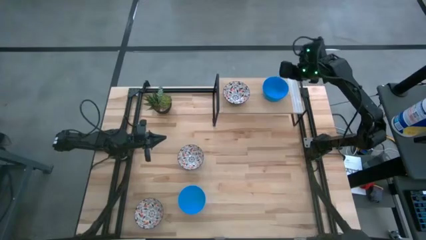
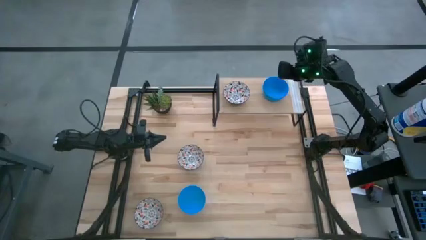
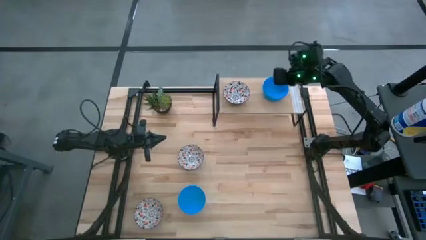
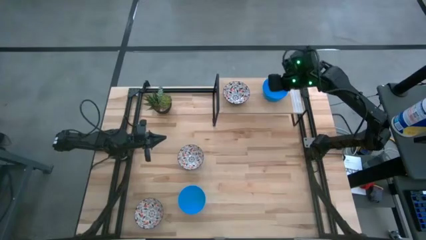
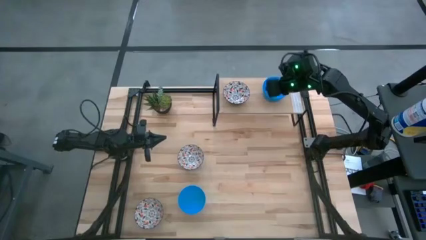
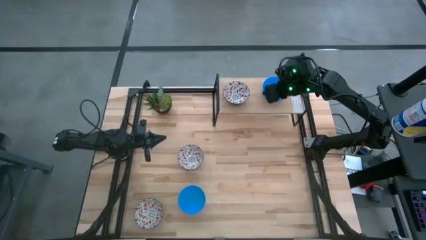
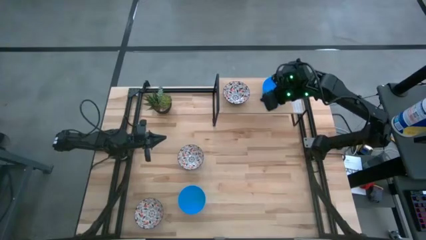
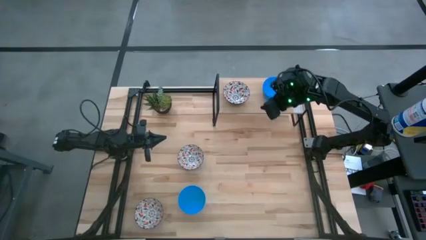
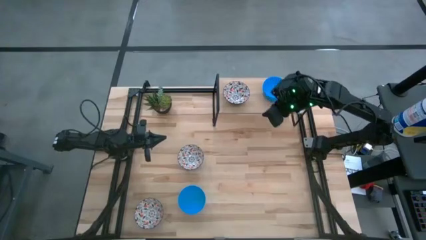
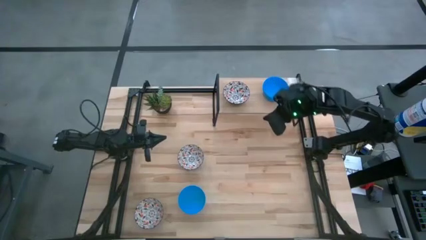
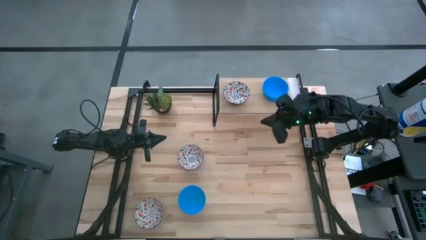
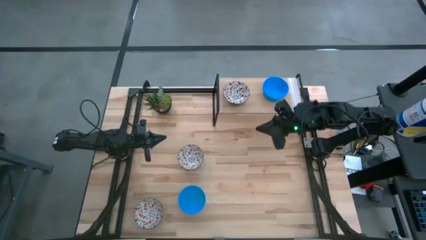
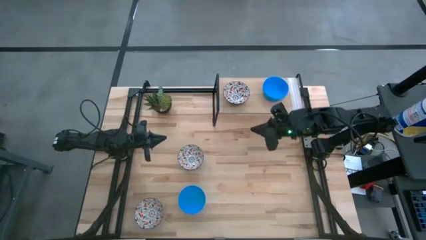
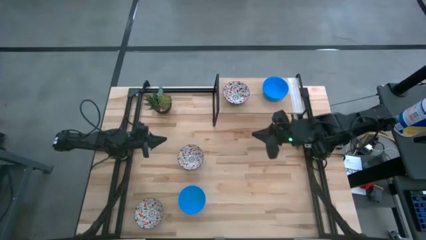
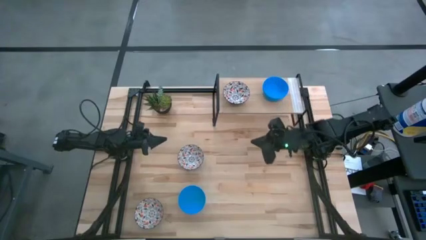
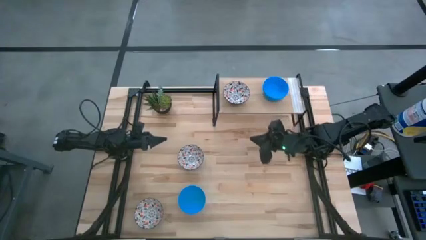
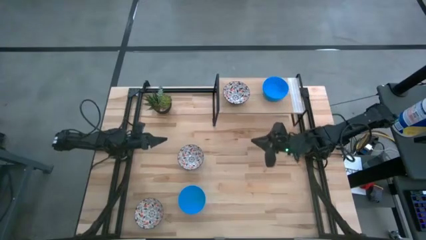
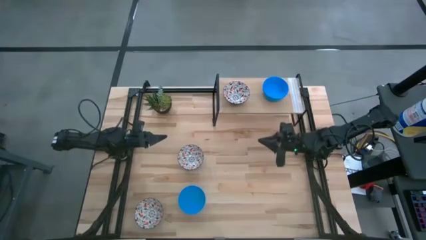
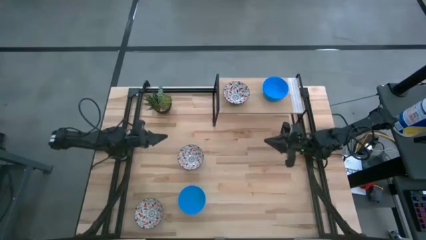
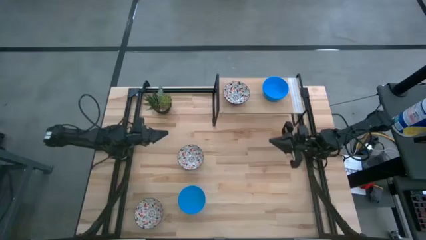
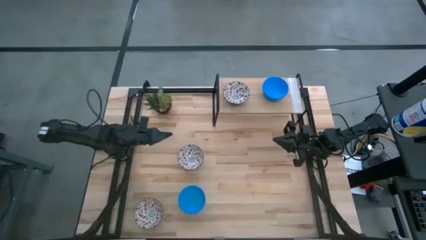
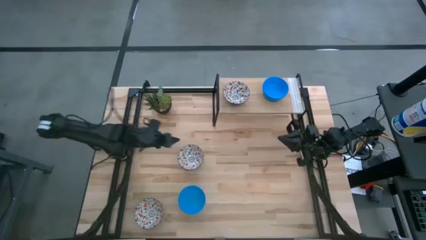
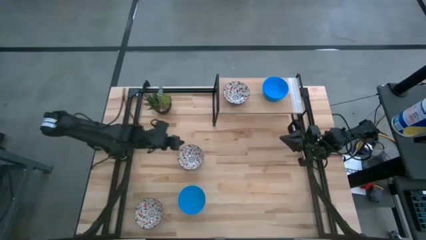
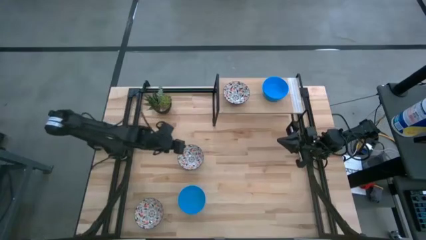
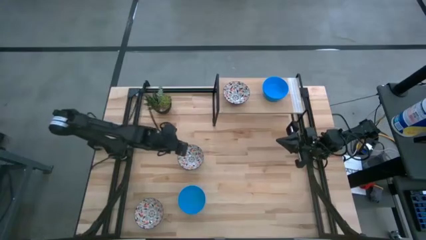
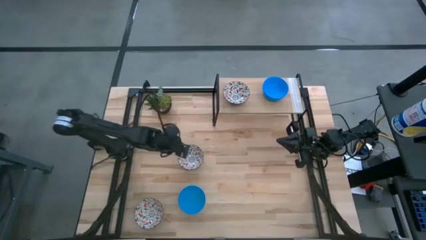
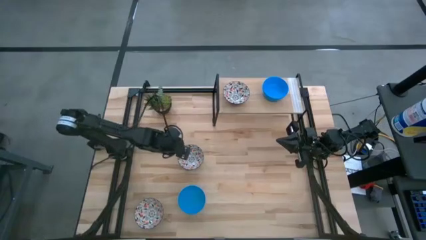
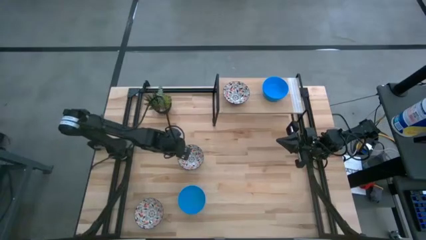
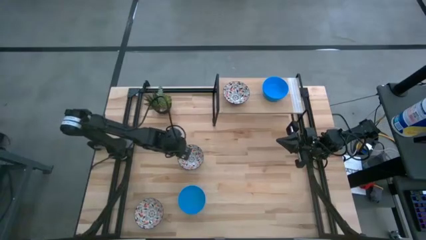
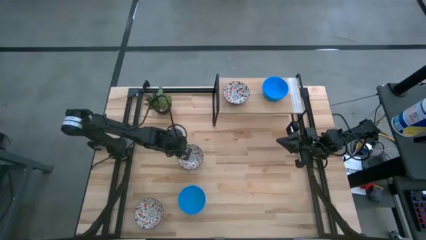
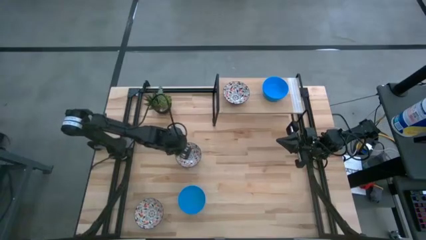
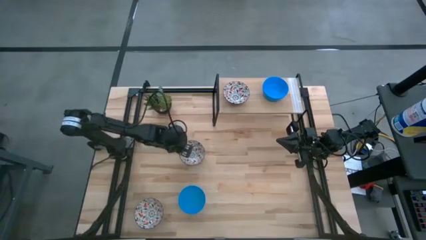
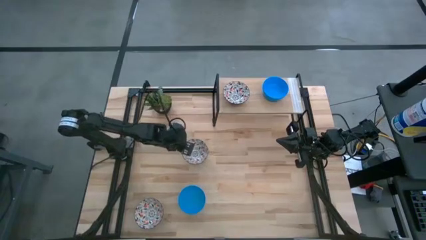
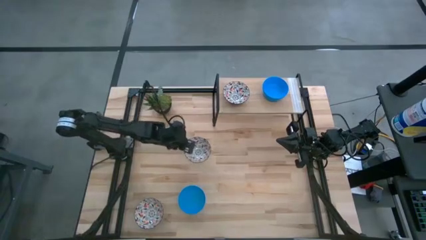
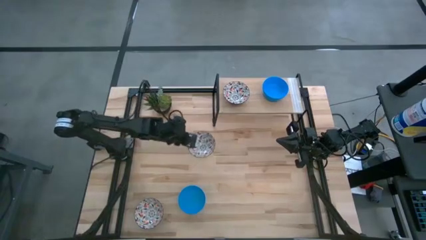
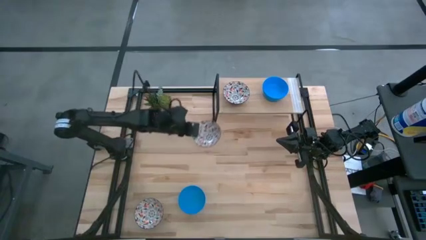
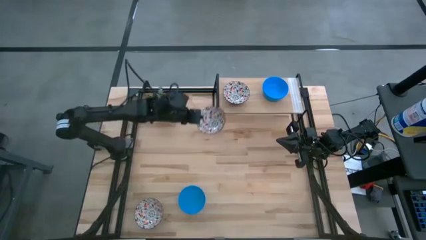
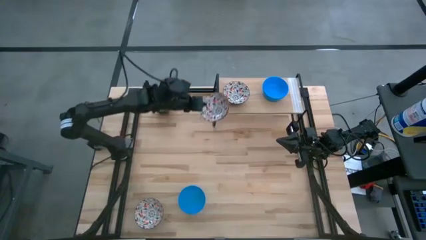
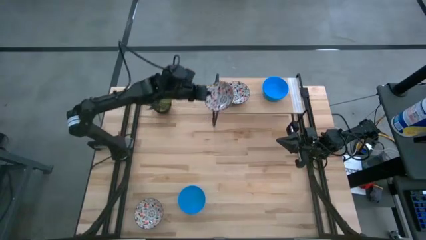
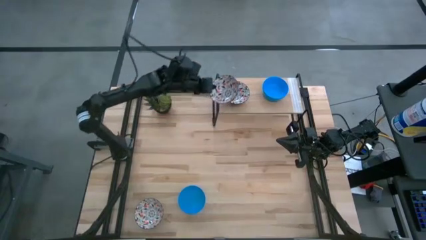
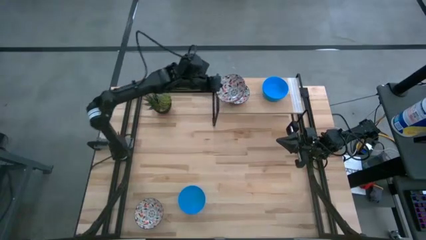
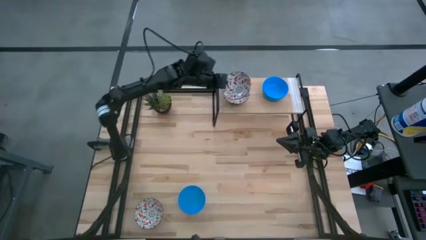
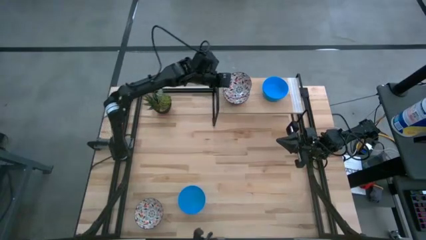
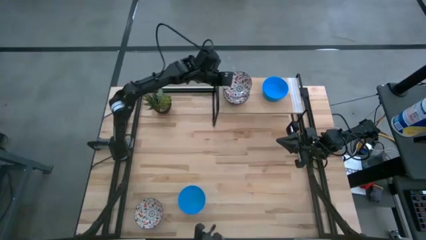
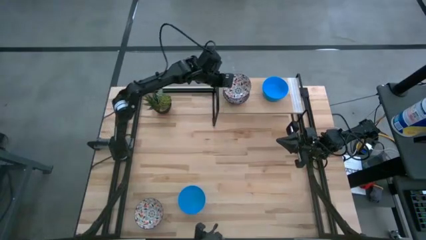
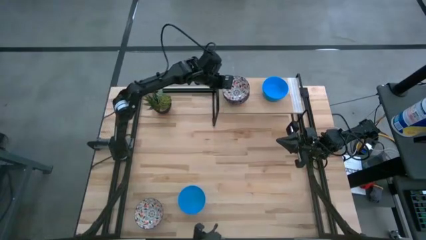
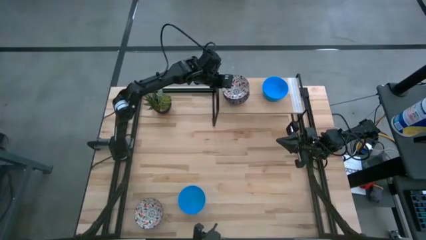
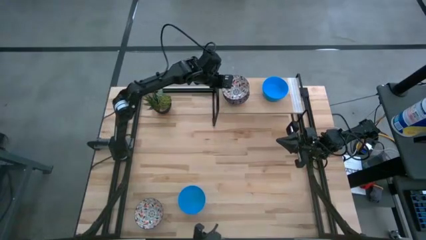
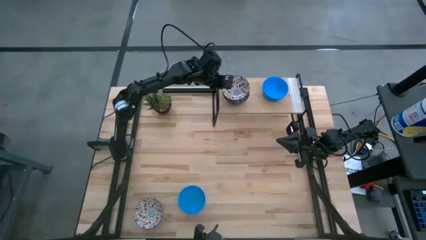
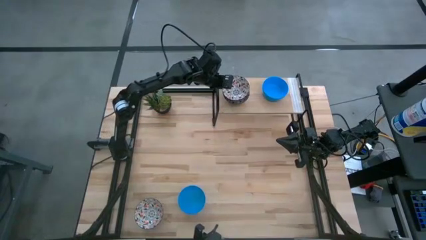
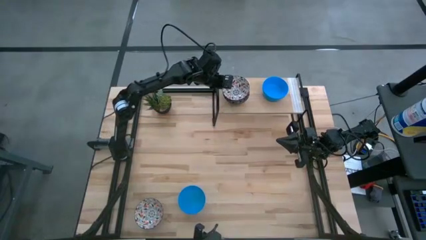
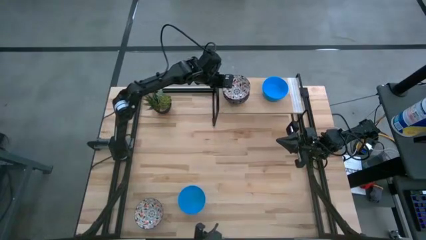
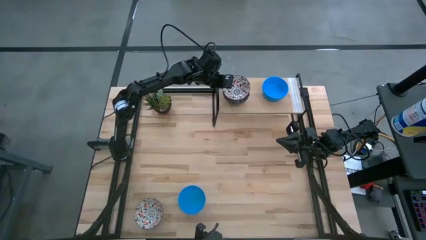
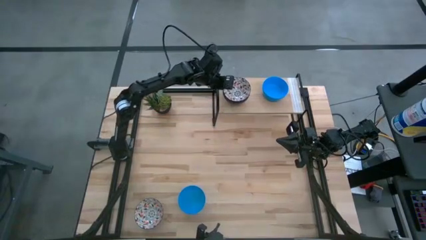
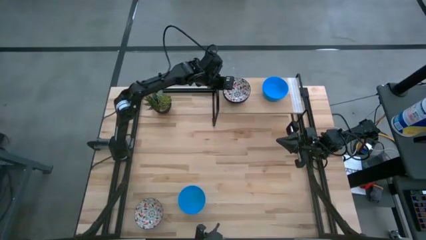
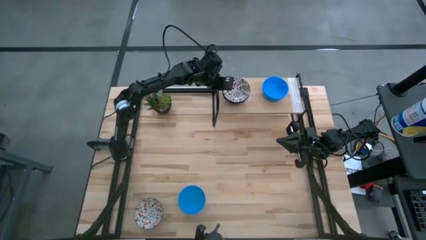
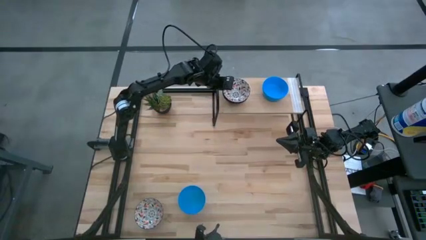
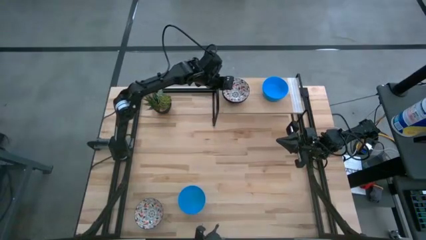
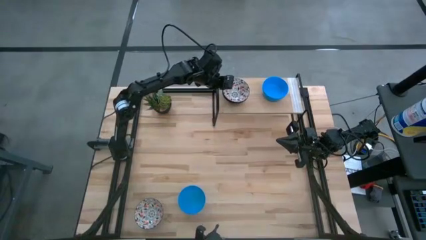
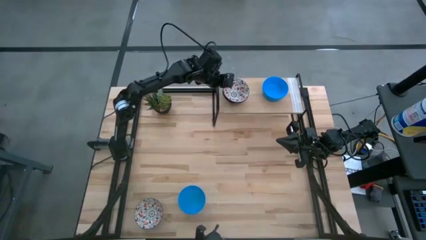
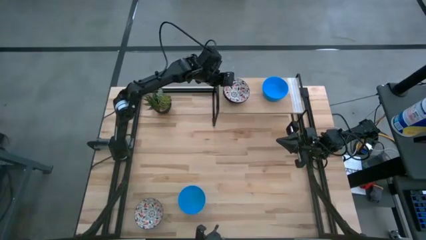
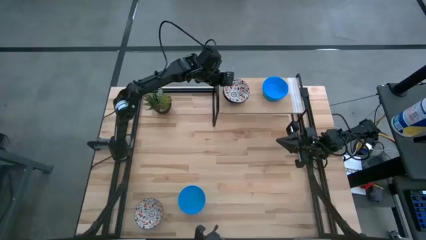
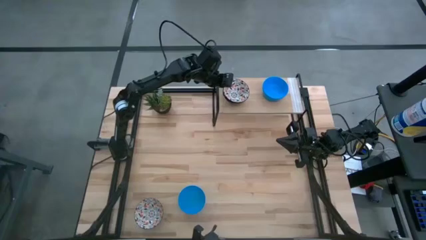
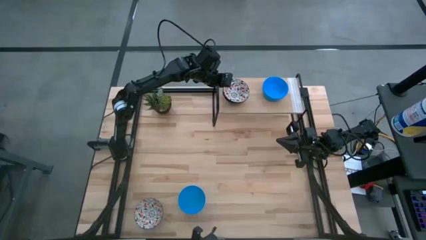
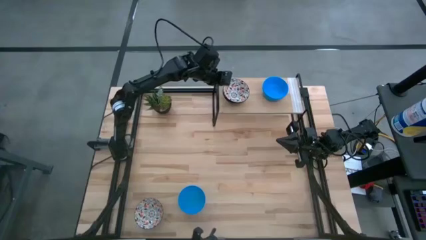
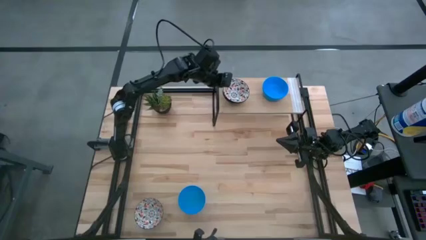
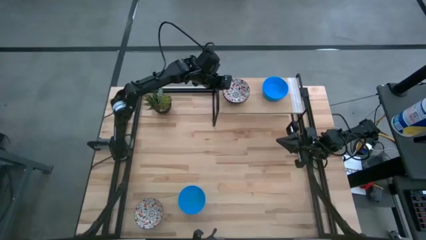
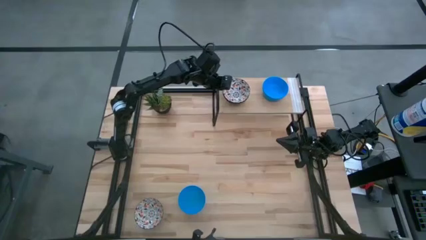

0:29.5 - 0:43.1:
Task: Pick & Place Mini bowls
Stack the top white patterned bowl on the white patterned bowl on the shelf
